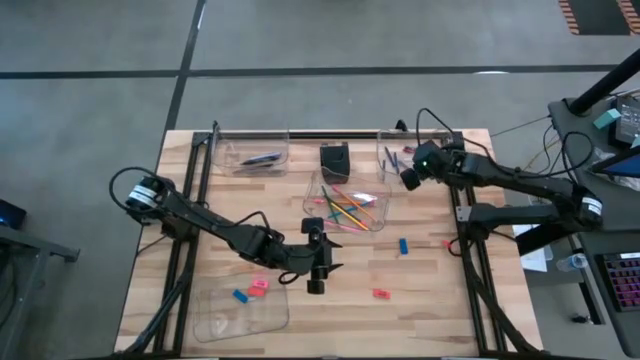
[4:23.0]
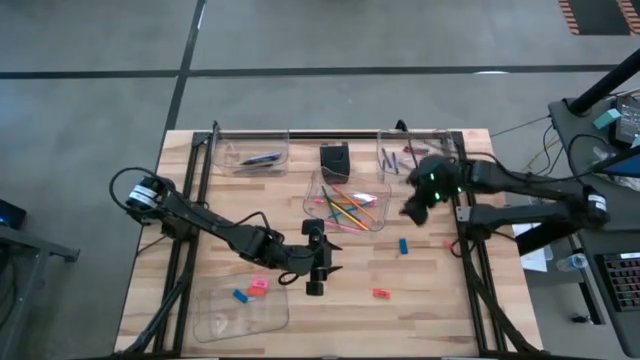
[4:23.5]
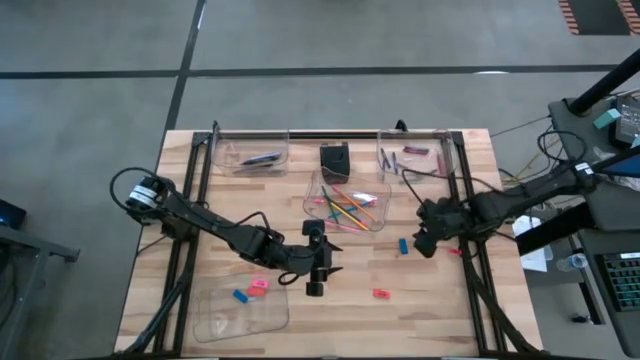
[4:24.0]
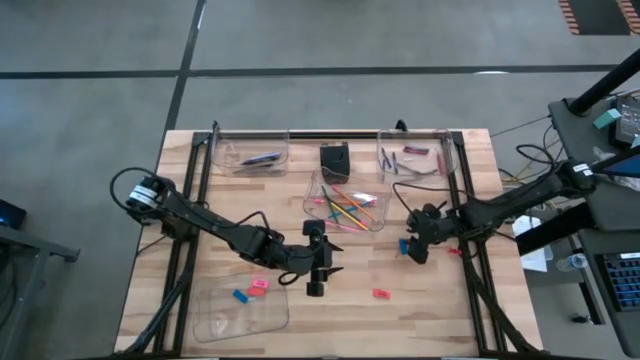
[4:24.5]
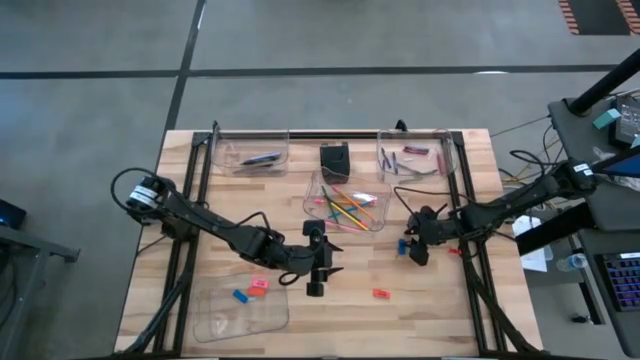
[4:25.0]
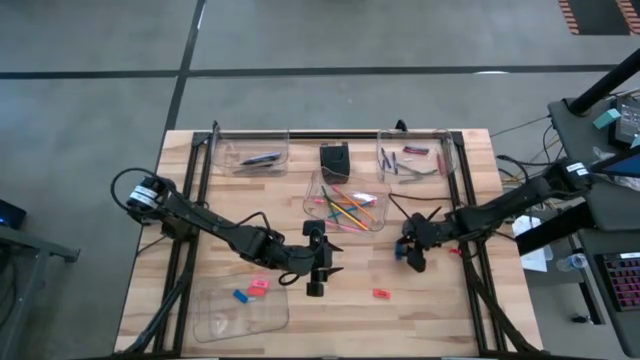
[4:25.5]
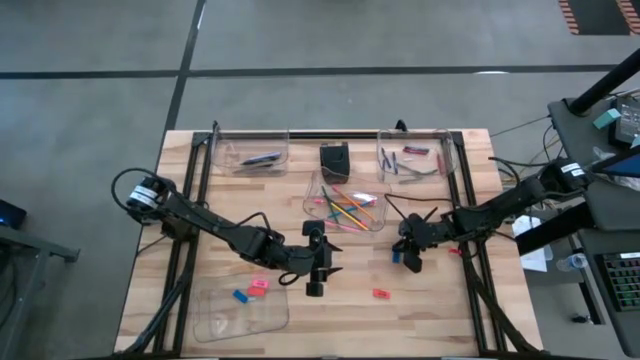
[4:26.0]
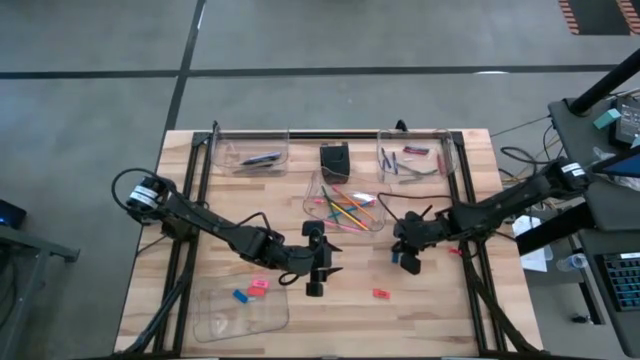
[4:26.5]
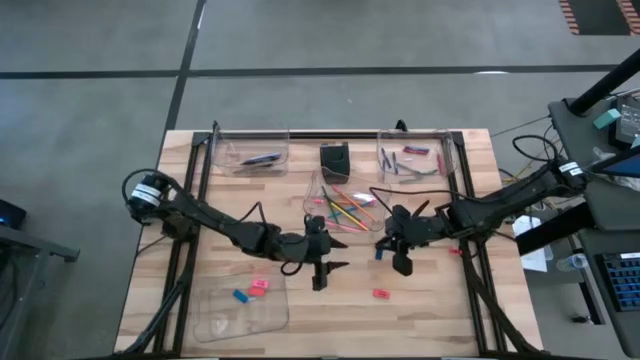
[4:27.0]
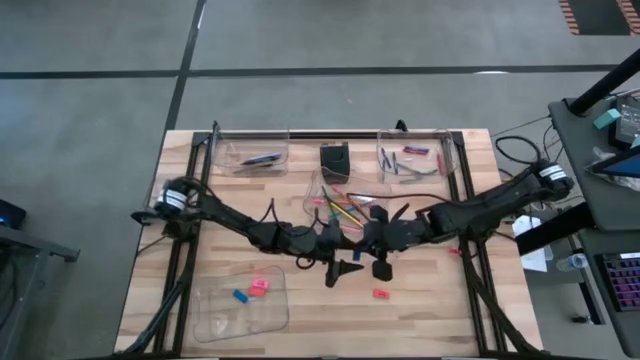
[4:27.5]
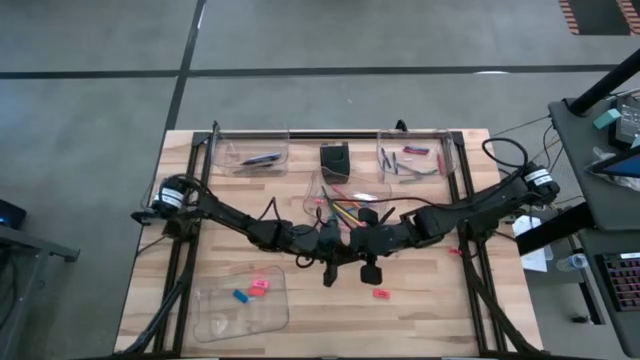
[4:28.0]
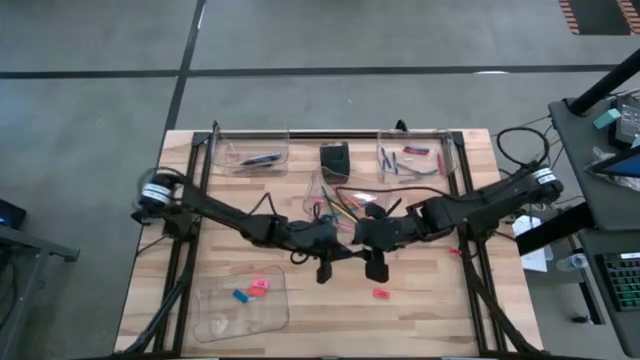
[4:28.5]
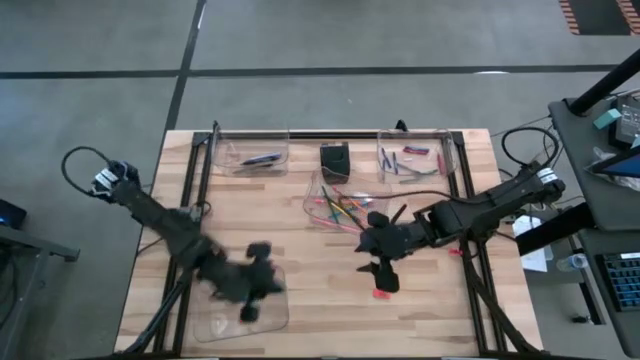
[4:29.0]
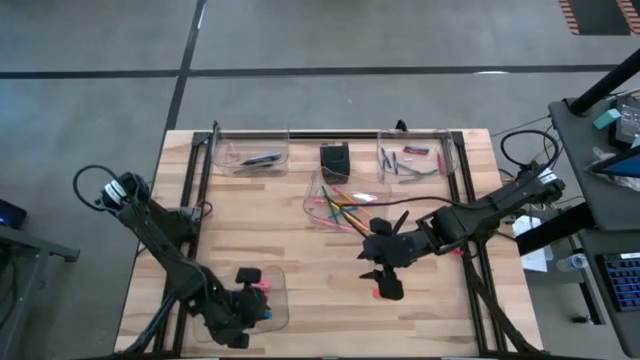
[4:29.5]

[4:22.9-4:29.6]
Task: Sort crayons/erasers/pens/pencils in bins
Put the blue eraser into the bottom left transparent bin

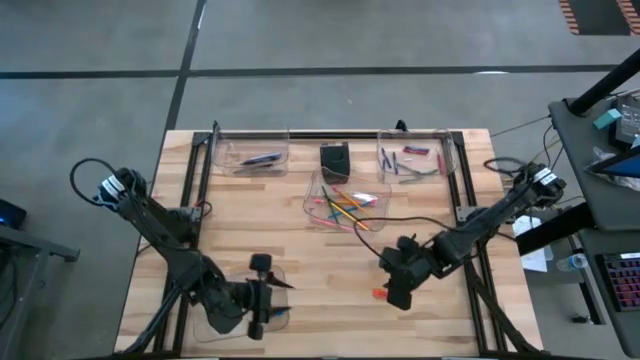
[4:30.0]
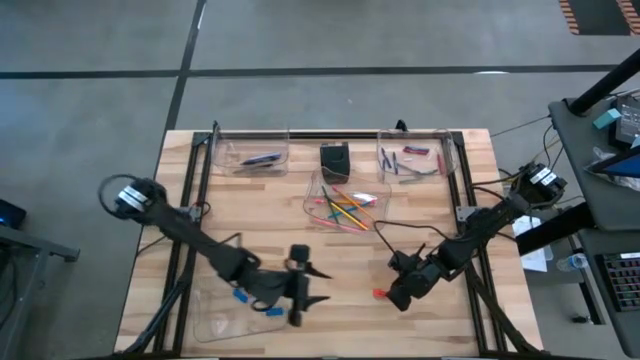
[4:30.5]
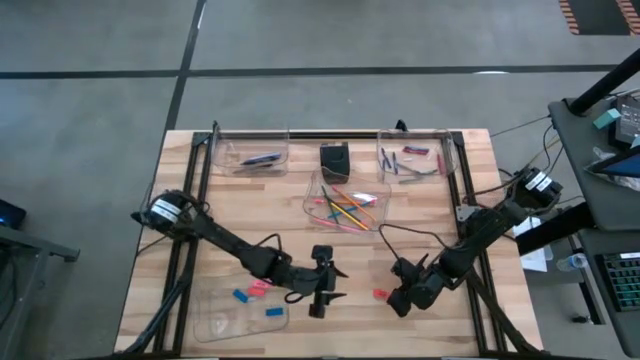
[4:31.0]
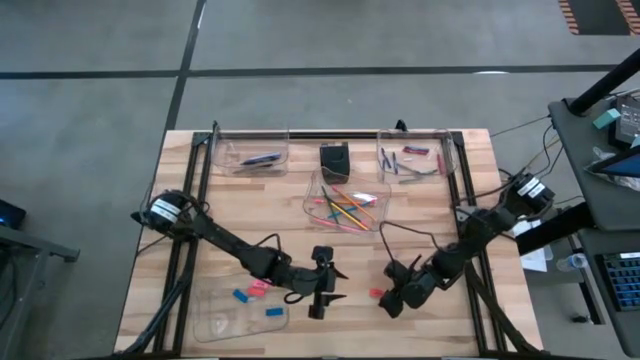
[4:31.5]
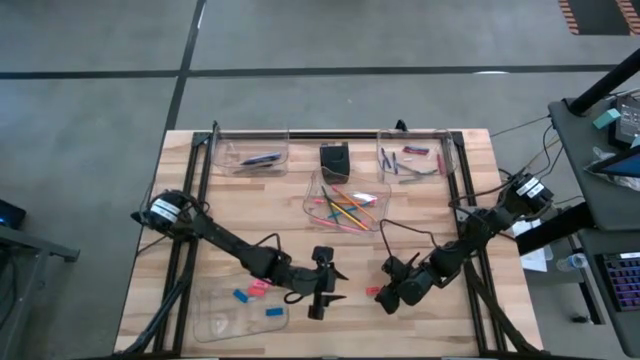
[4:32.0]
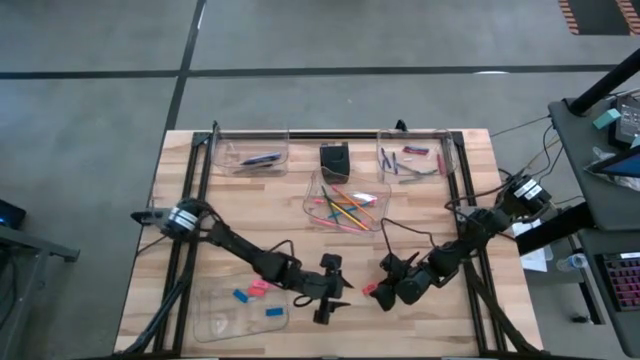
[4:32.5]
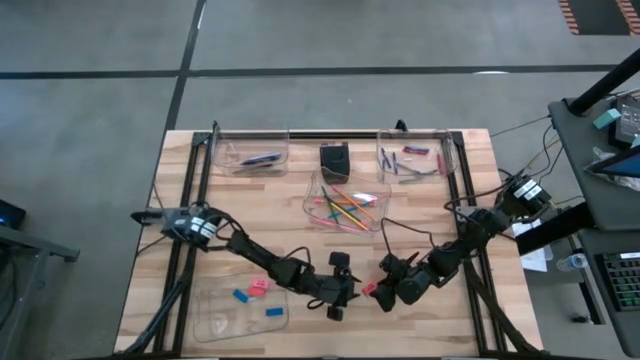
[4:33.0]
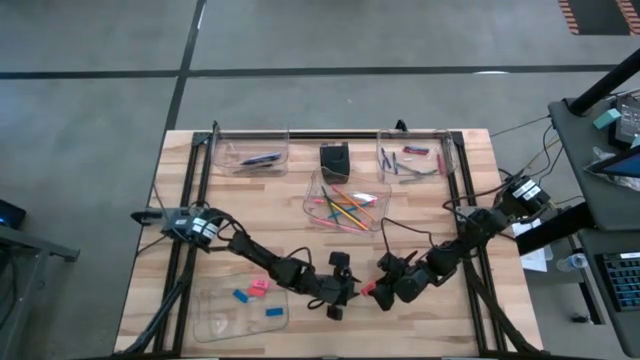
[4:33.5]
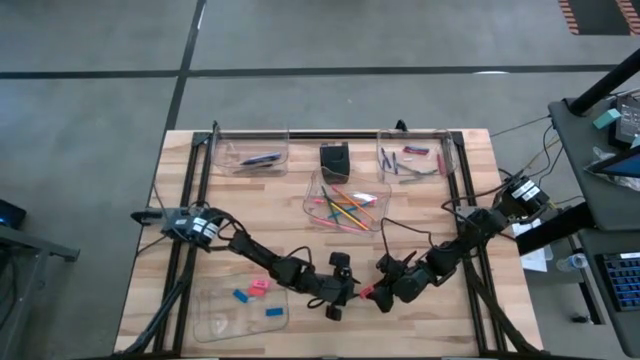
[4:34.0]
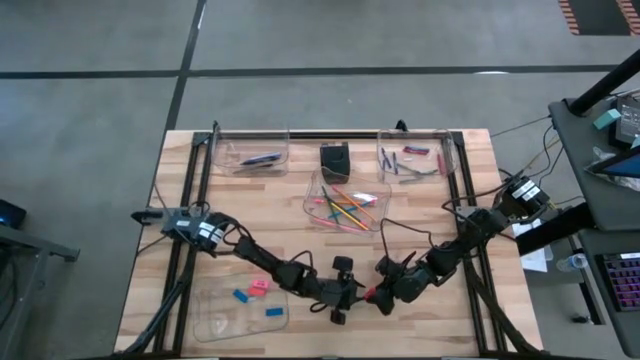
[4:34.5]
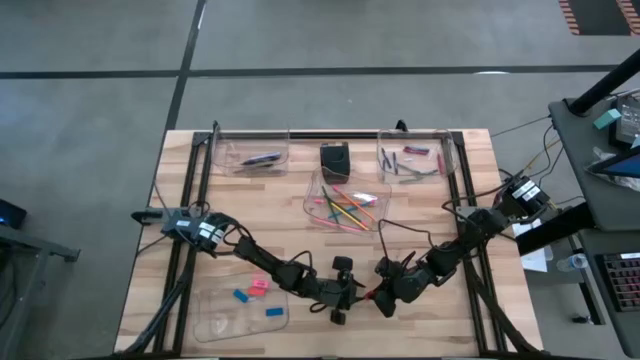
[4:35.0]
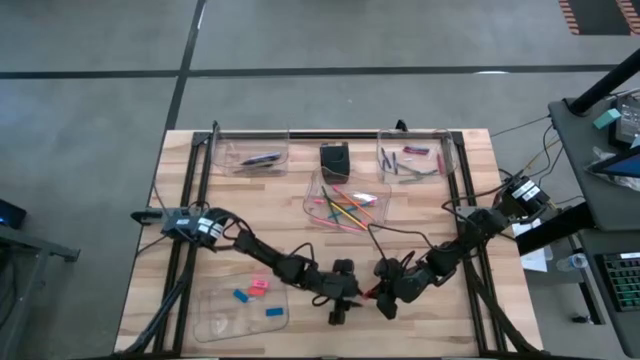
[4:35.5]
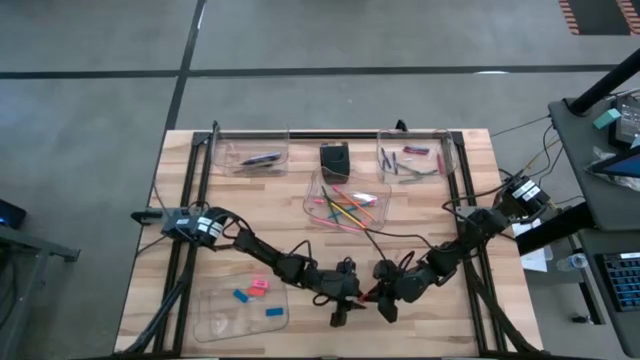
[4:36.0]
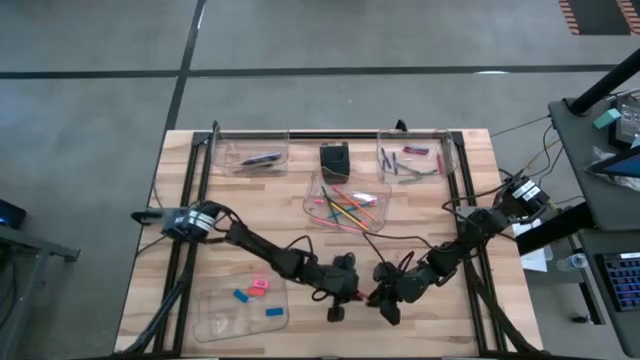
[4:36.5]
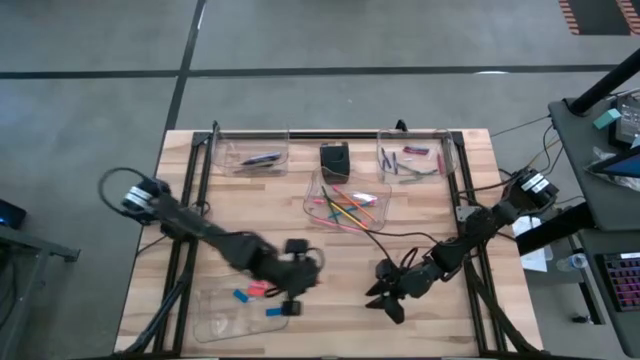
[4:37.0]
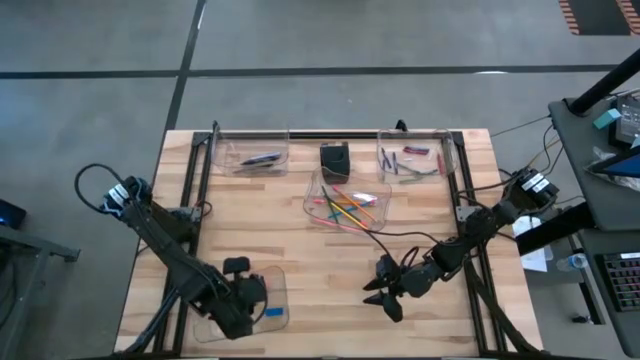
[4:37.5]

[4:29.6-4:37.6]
Put the orange eraser into the bottom left transparent bin

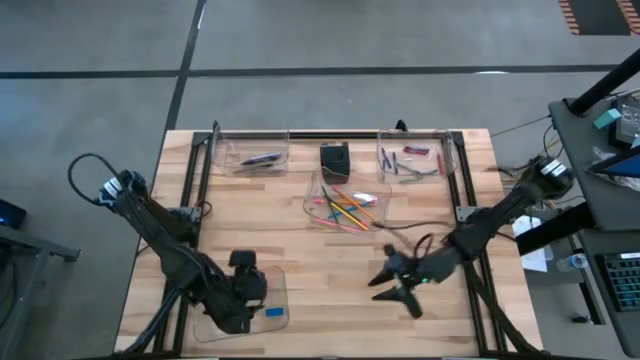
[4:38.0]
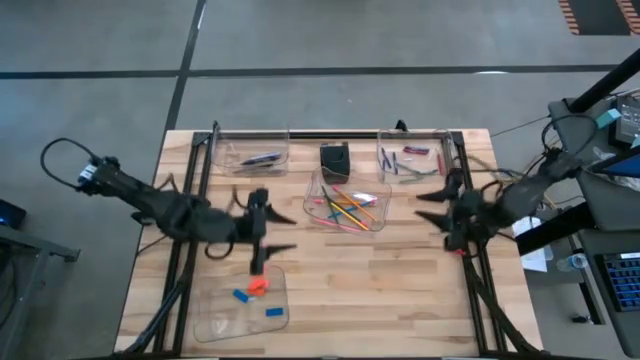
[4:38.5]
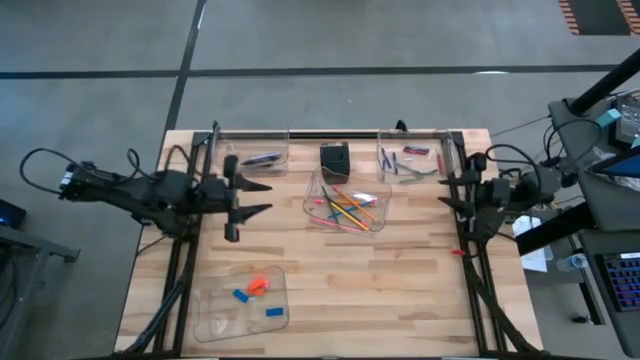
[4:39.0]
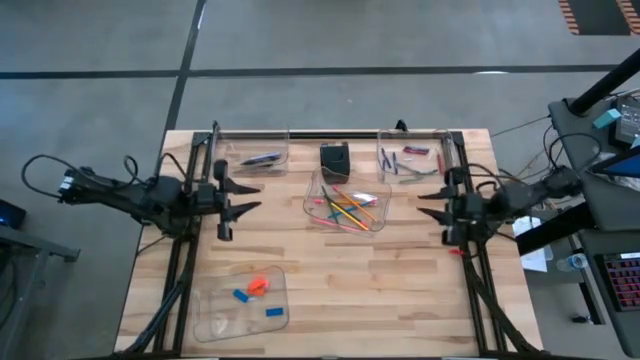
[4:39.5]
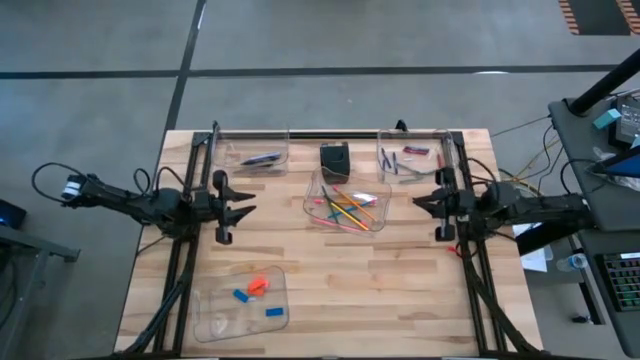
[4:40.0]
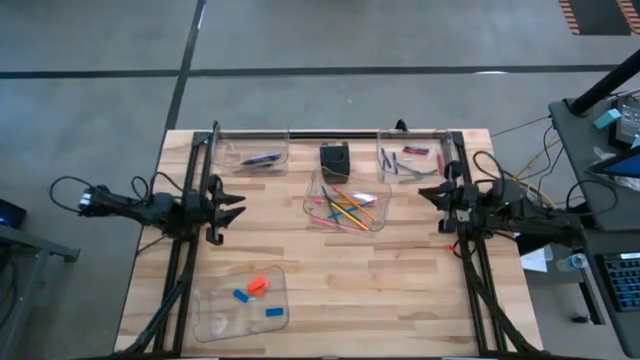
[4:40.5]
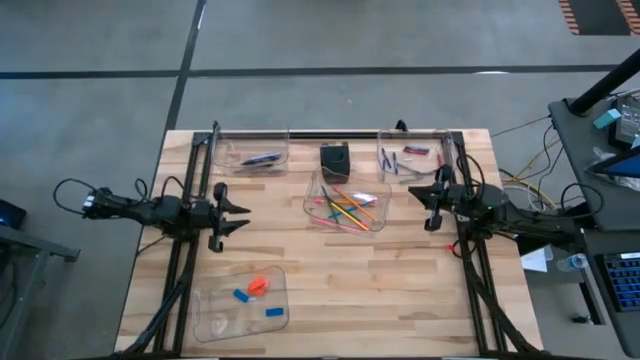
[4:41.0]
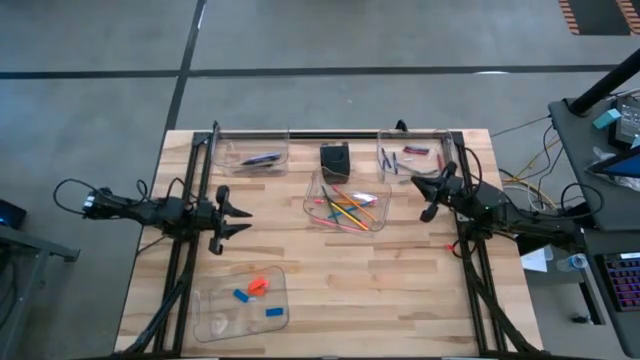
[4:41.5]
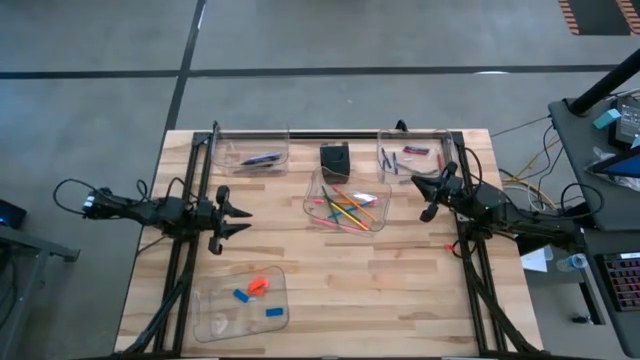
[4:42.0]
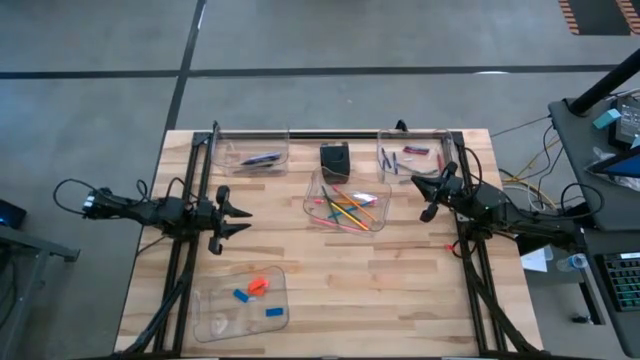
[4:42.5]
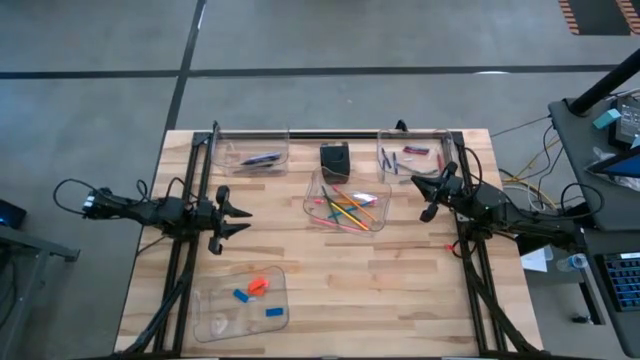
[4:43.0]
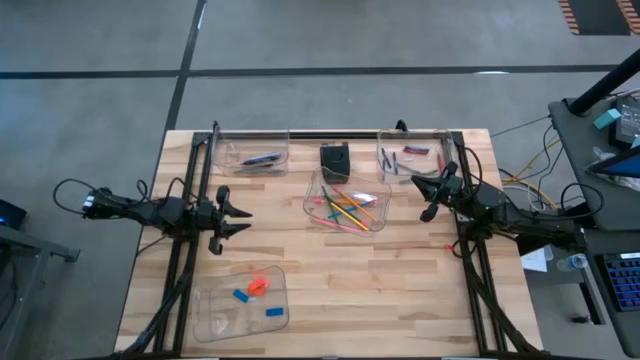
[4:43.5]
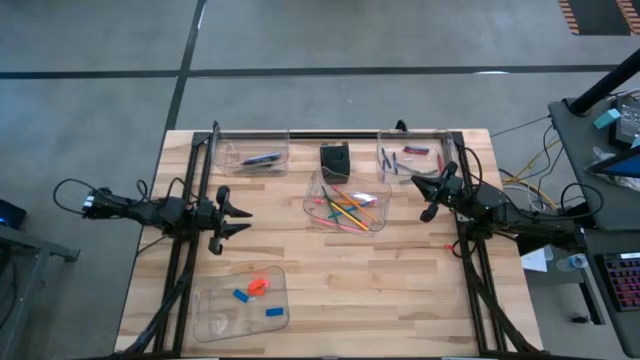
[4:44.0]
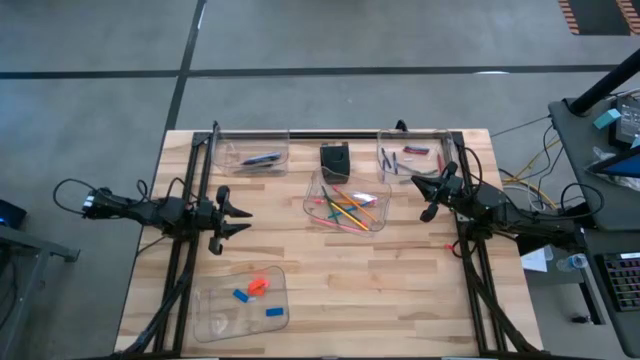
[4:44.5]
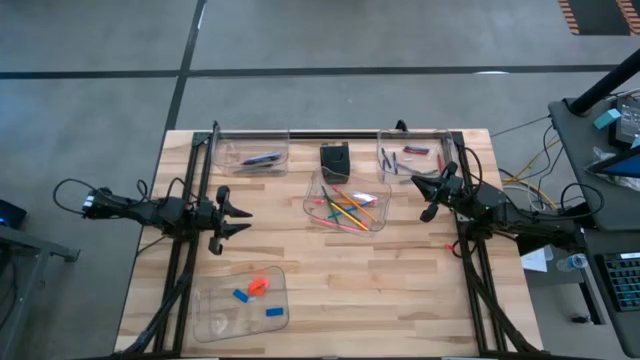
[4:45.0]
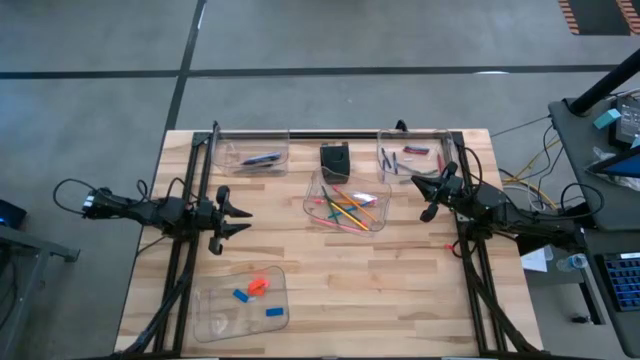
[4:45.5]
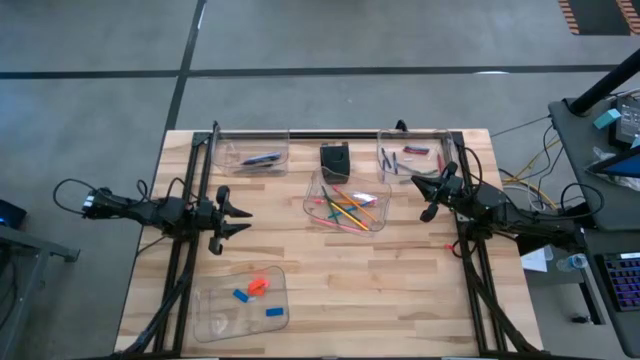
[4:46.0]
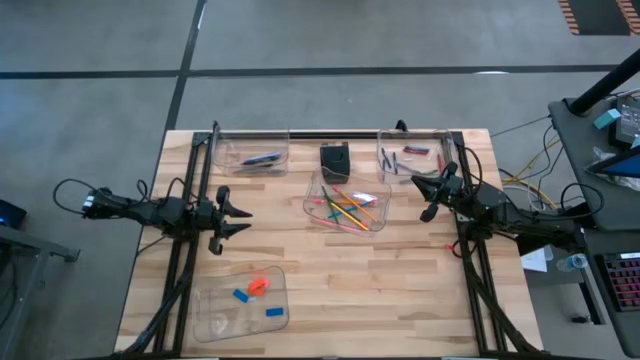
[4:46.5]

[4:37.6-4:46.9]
Return to Home Position
